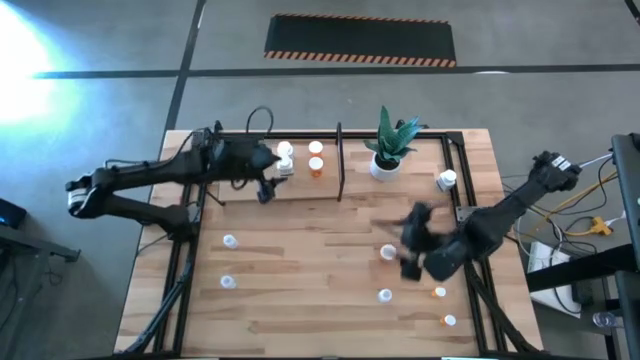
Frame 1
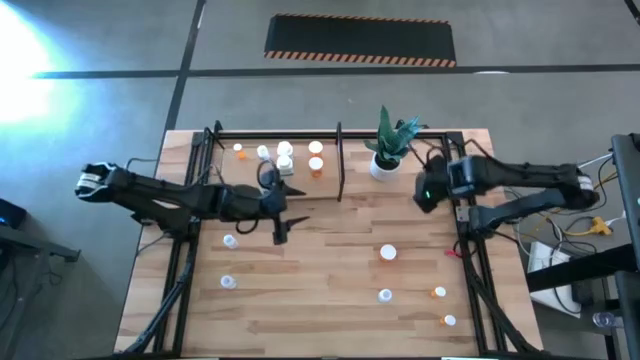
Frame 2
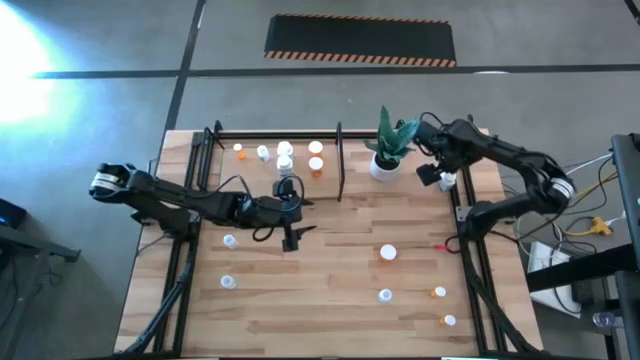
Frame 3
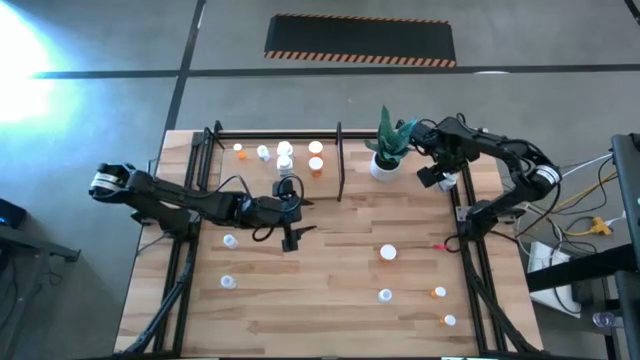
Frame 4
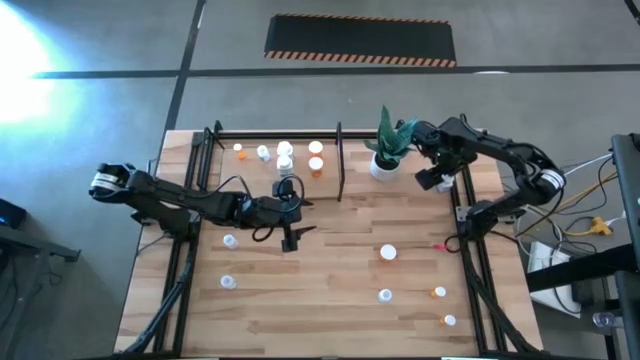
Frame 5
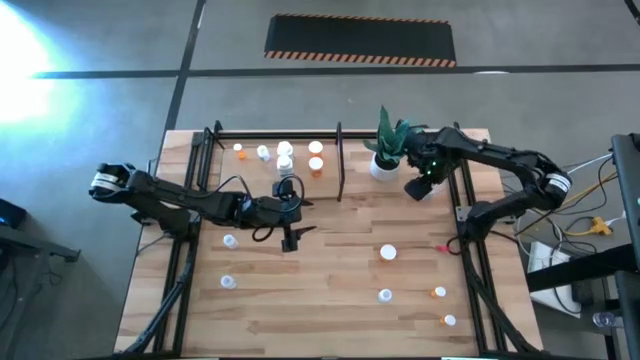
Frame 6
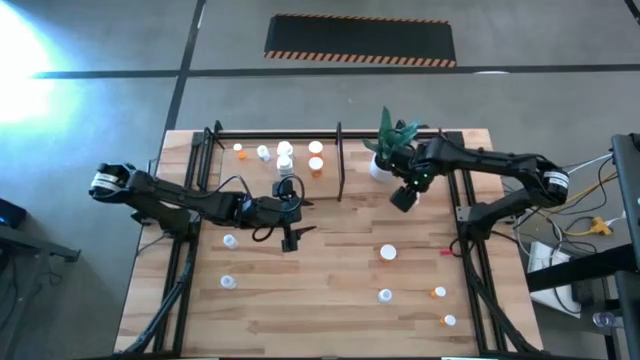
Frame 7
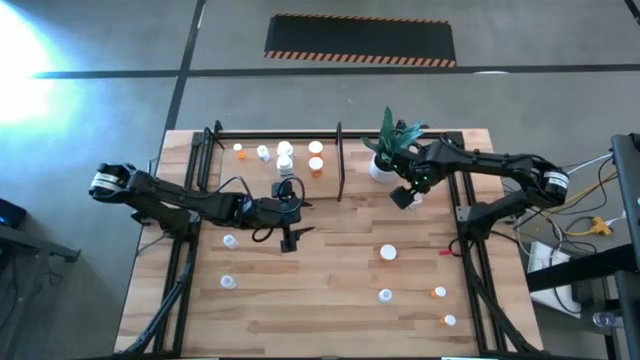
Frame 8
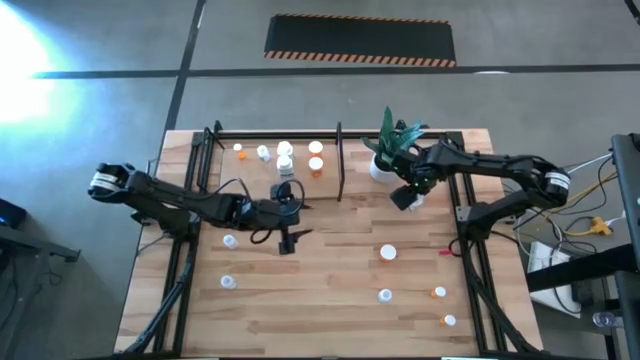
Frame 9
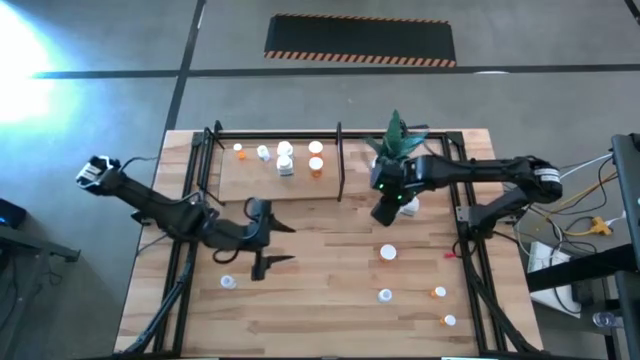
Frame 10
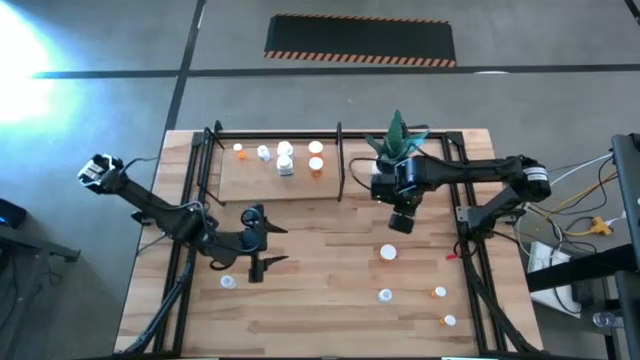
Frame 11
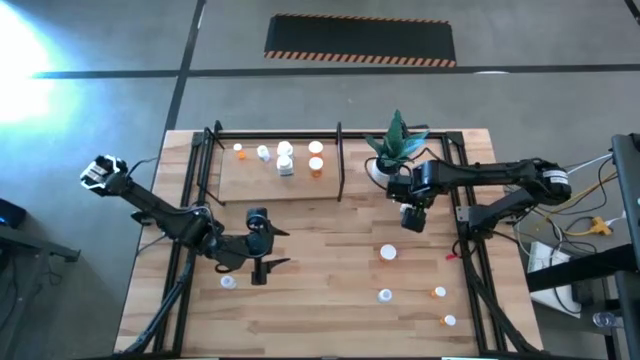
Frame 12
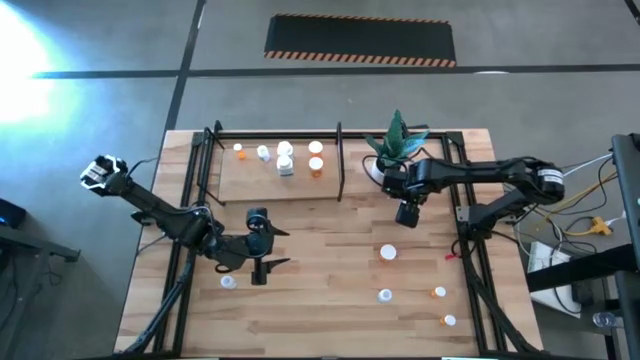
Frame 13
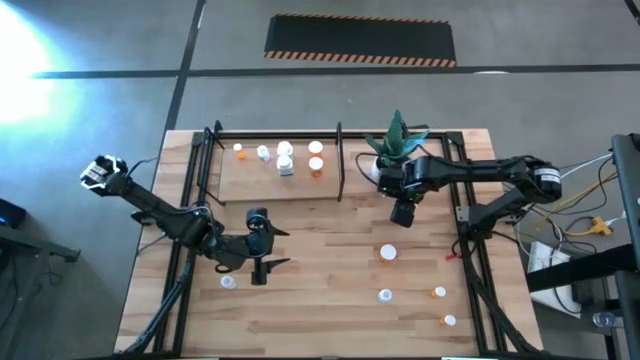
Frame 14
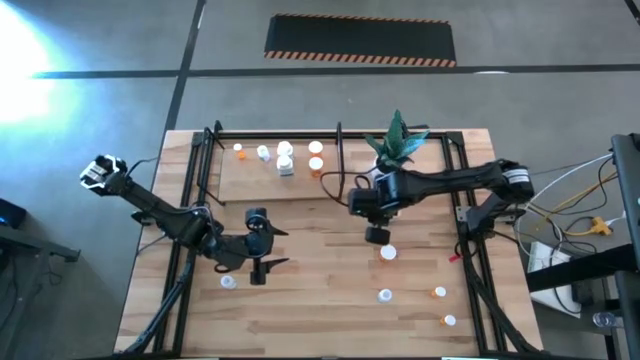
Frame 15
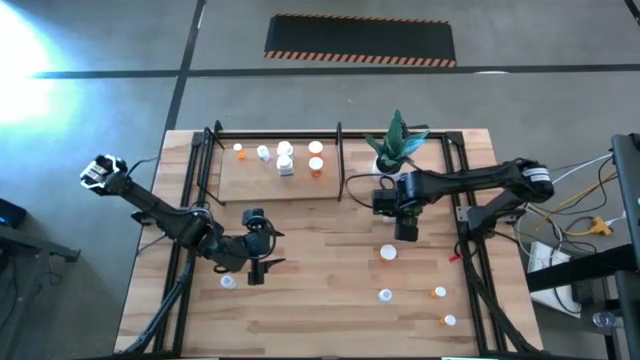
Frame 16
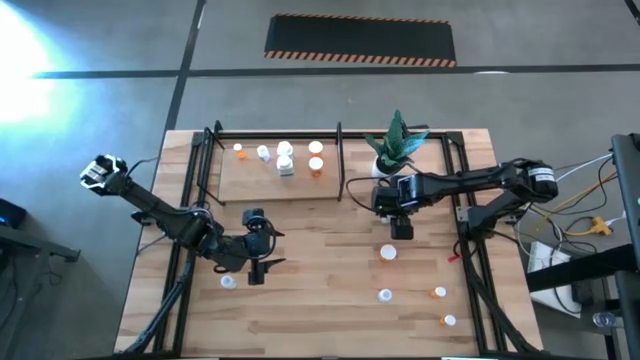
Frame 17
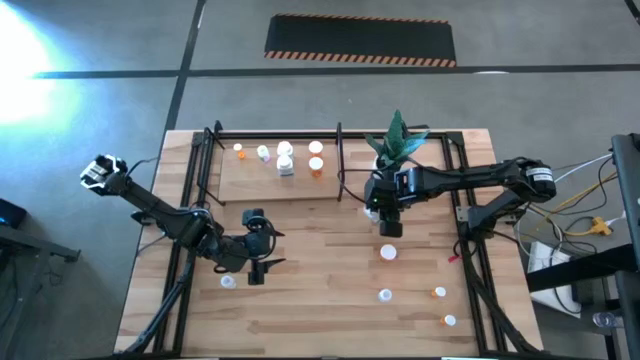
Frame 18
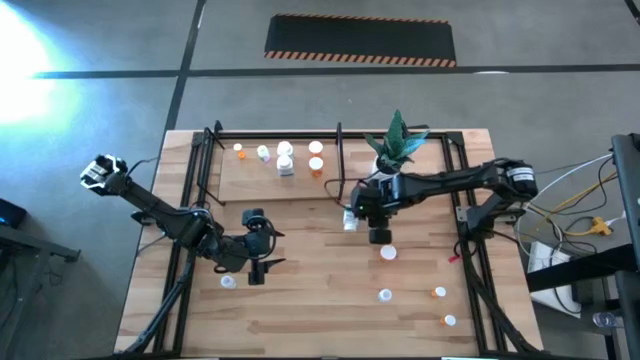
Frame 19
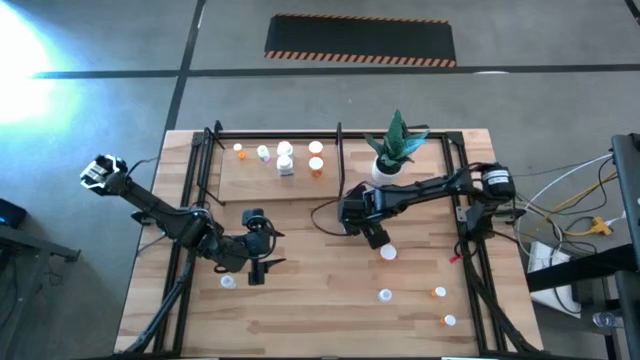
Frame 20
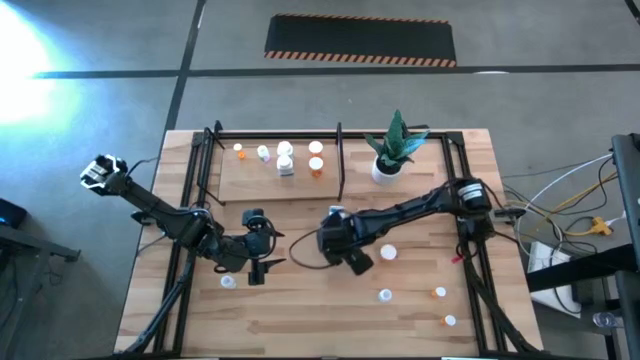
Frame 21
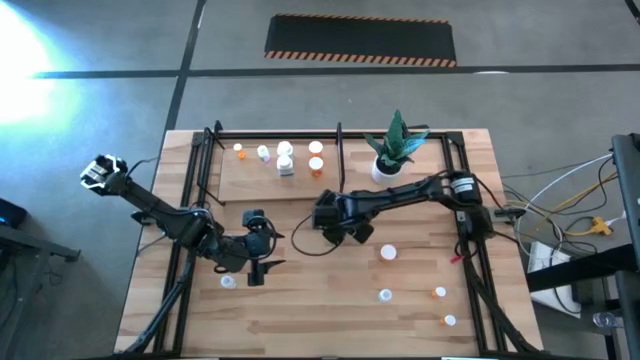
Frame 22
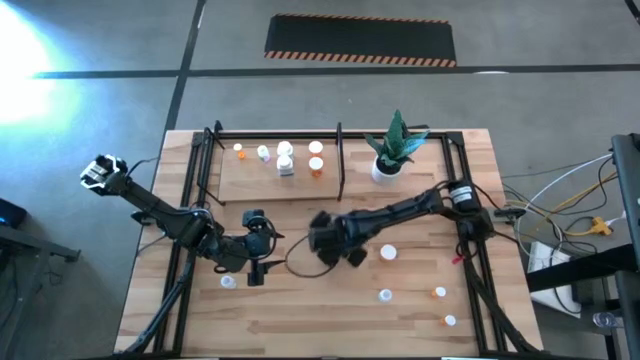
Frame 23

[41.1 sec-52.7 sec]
Task: Pick and place medicine bottles onto shelf by color
Put the white blue medicine container on the shelf

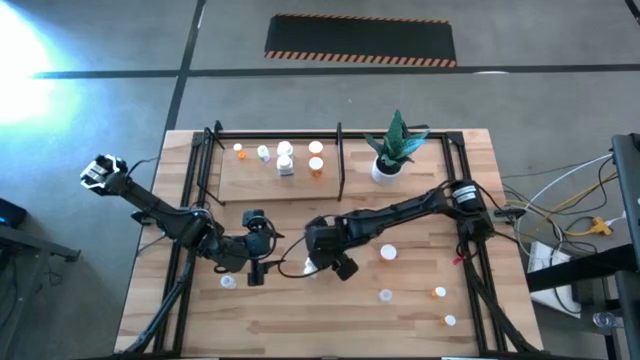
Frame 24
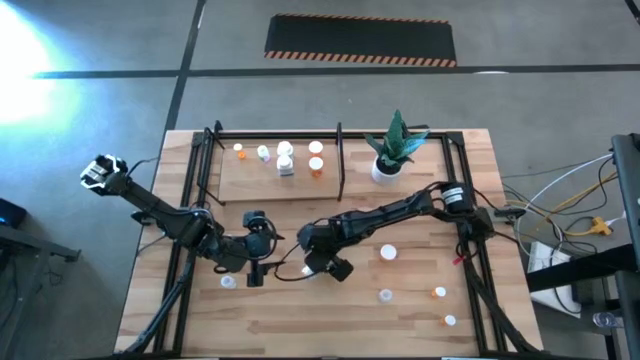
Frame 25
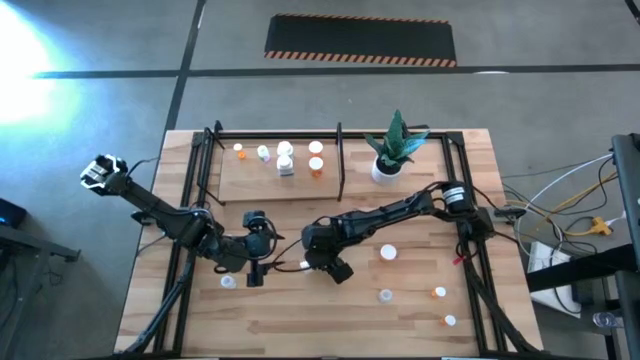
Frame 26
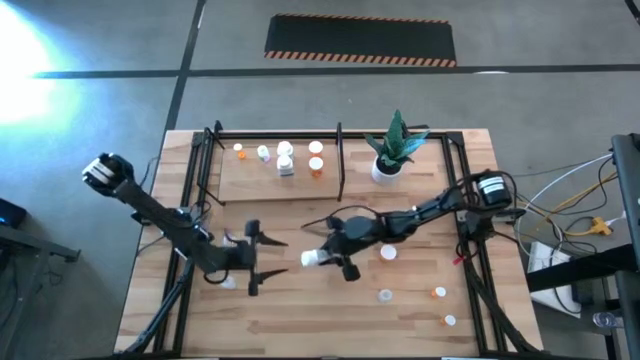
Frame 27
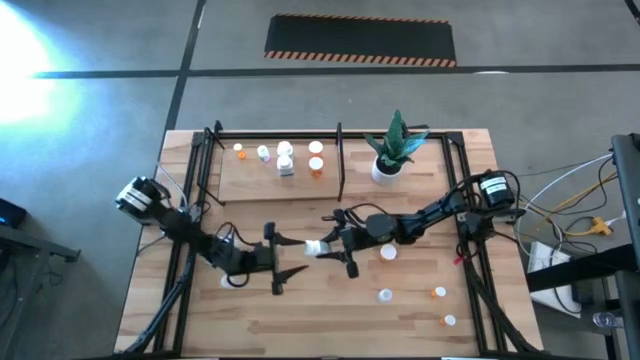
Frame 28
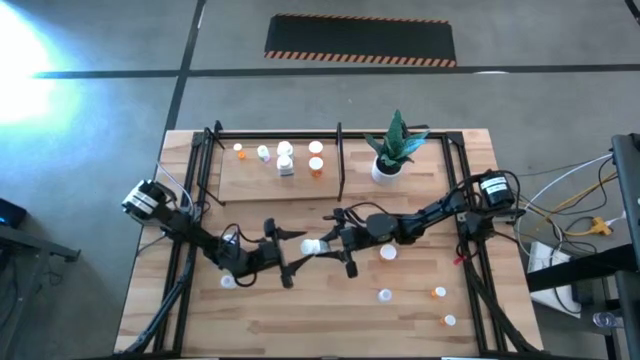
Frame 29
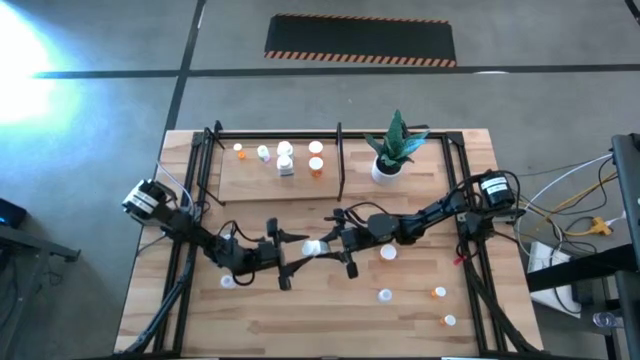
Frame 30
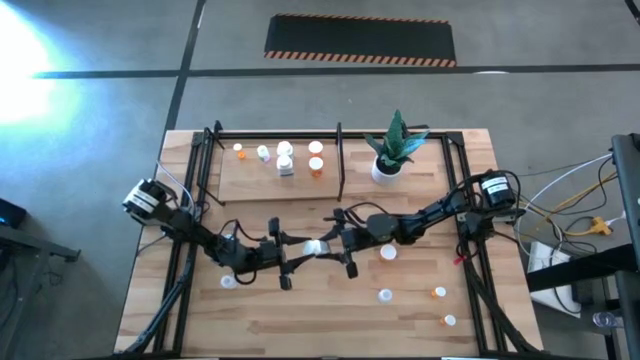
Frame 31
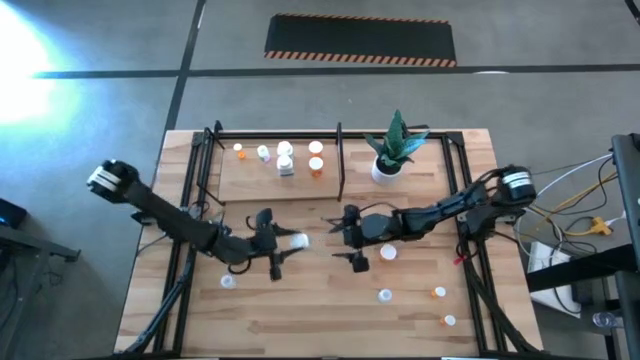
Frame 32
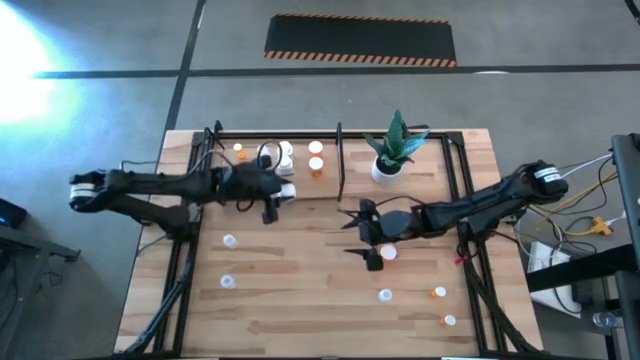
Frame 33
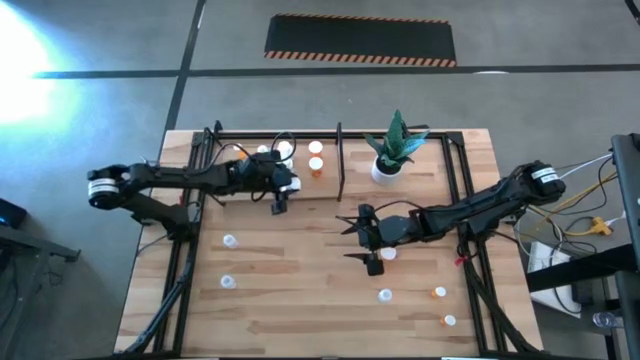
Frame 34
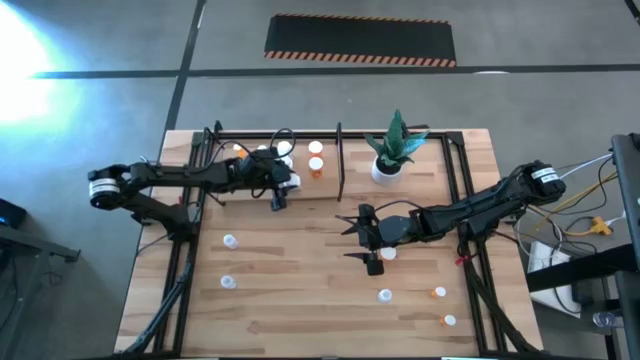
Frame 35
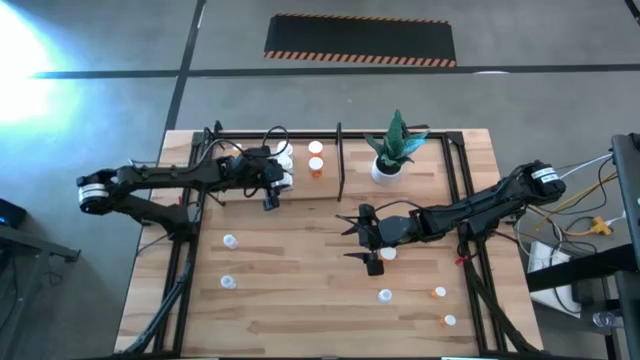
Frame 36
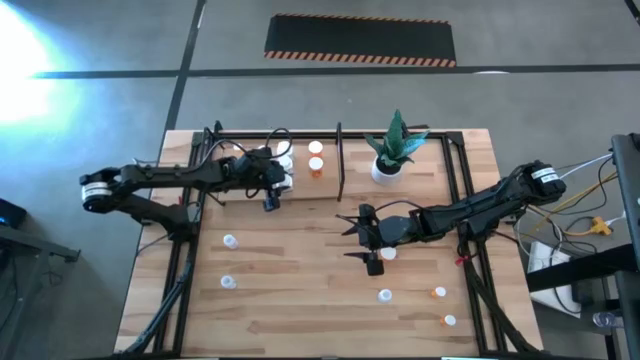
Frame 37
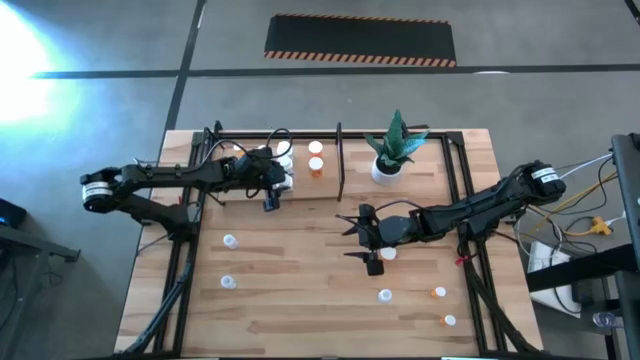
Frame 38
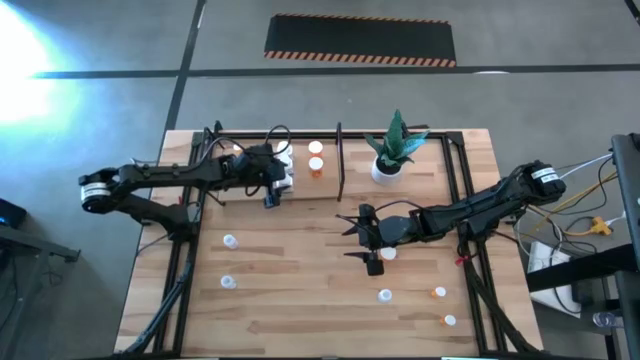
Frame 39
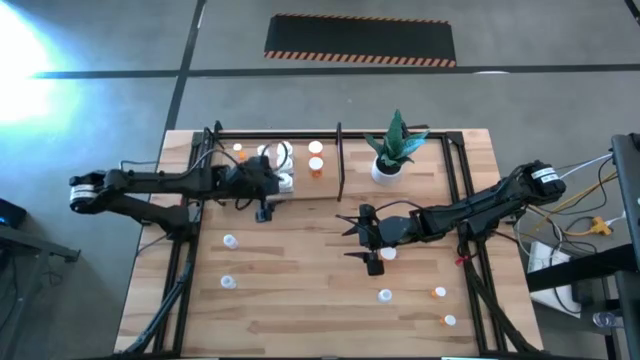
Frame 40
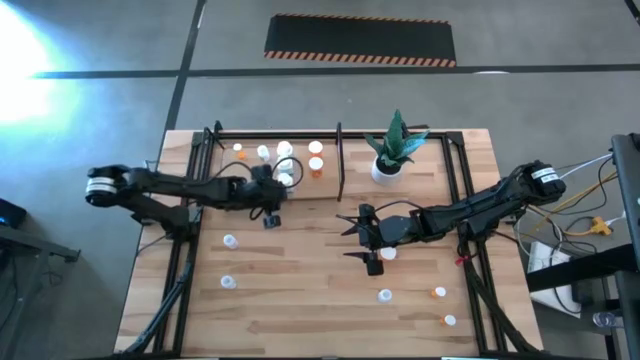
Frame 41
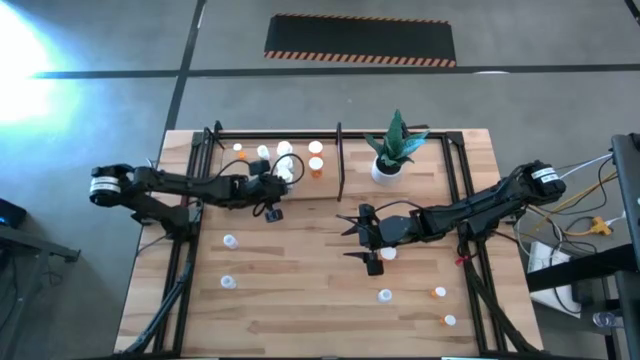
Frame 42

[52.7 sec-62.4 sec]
Put the white blue medicine container on the shelf

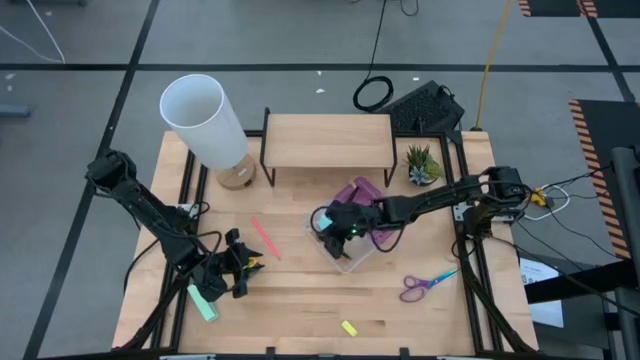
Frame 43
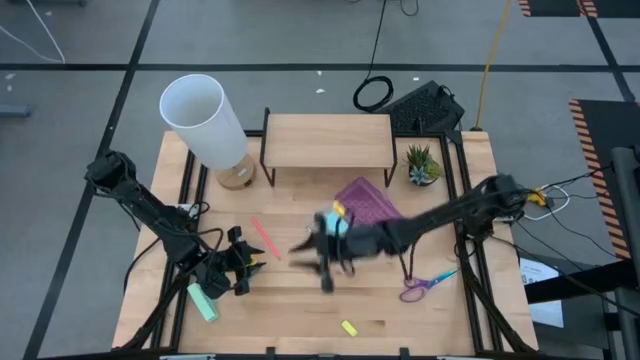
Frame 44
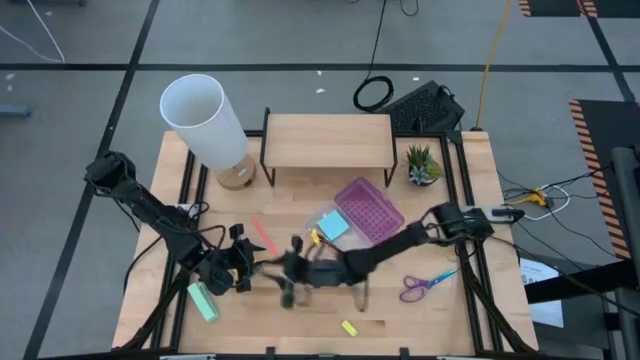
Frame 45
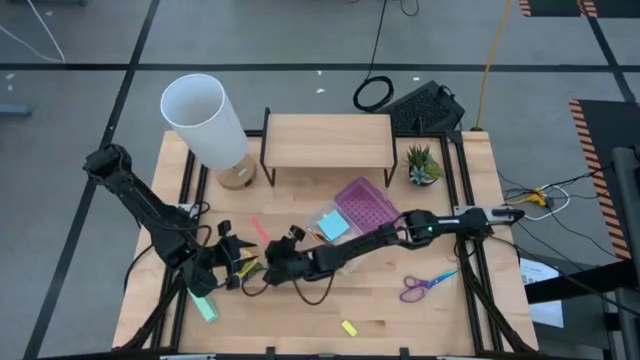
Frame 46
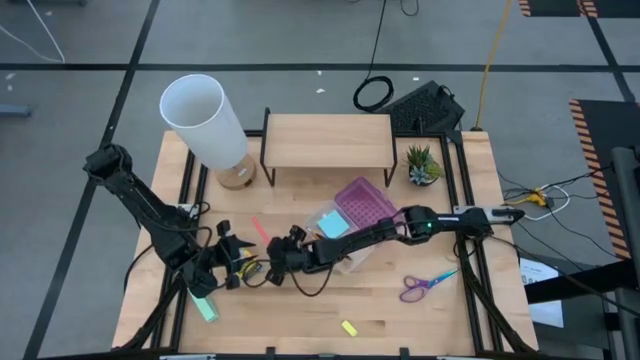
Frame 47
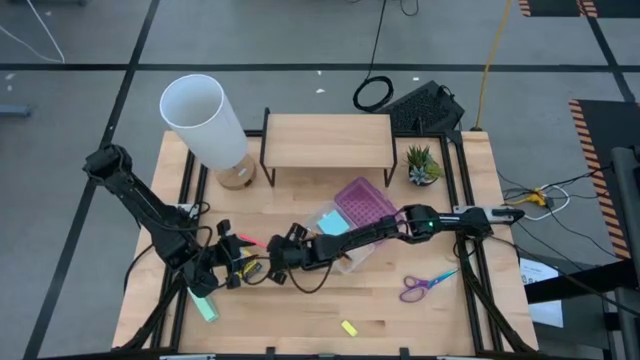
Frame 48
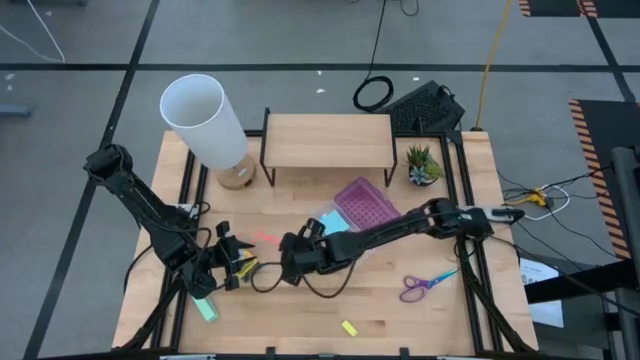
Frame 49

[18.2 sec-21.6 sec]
Task: Pack school essentials
Put the pink pencil into the transparent violet supply box
